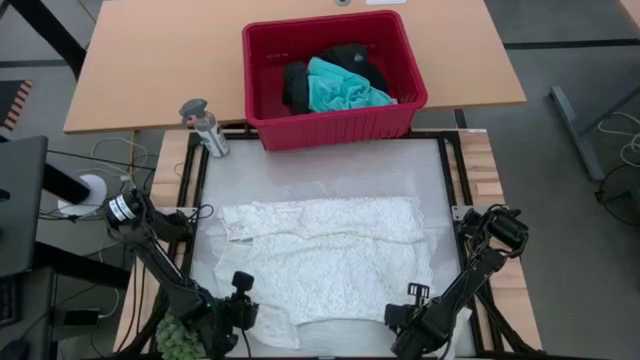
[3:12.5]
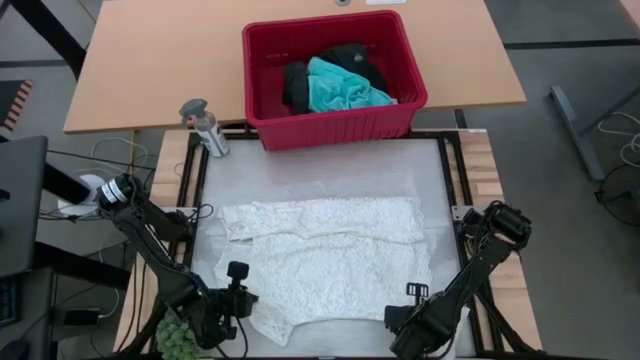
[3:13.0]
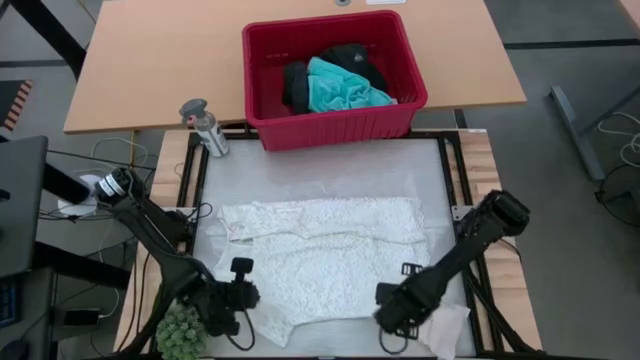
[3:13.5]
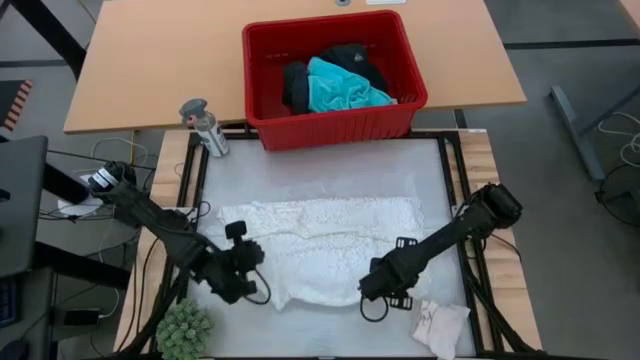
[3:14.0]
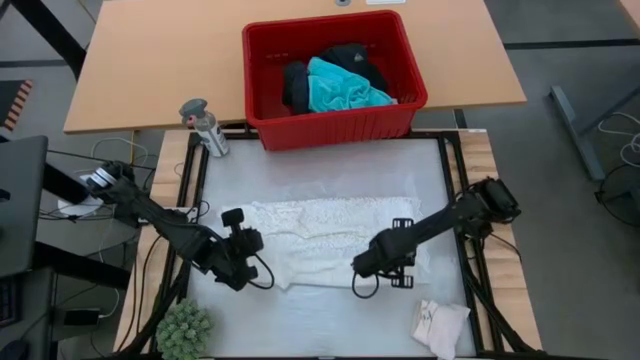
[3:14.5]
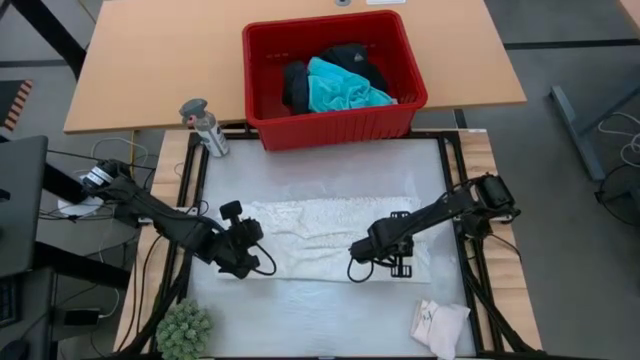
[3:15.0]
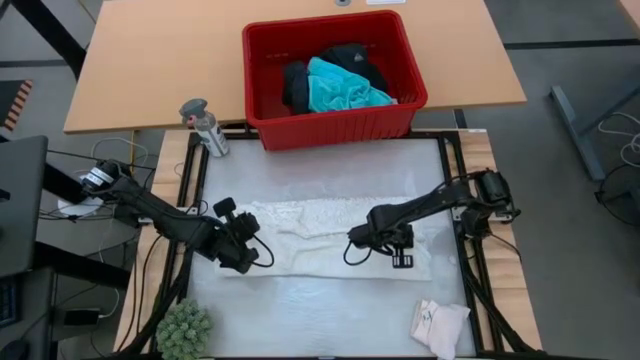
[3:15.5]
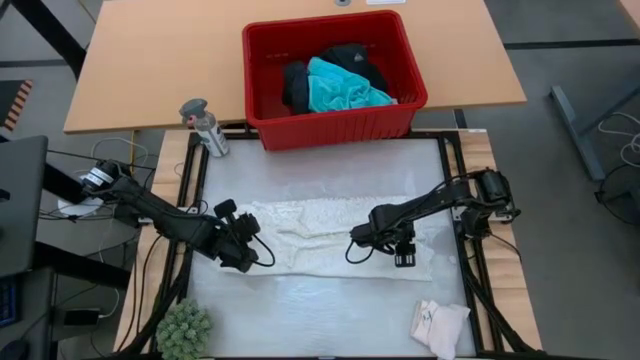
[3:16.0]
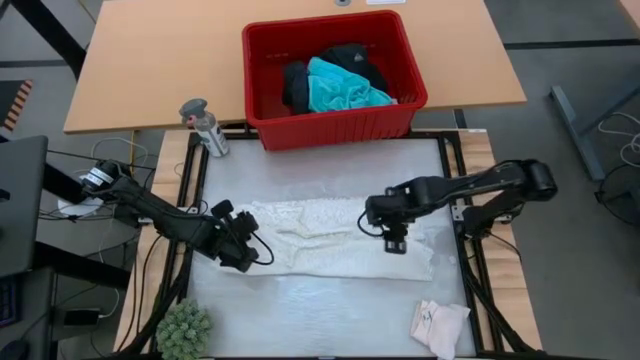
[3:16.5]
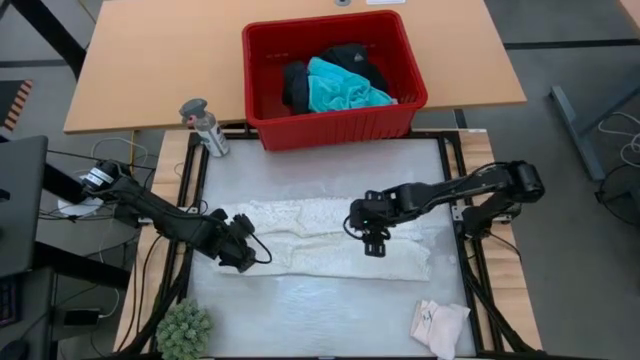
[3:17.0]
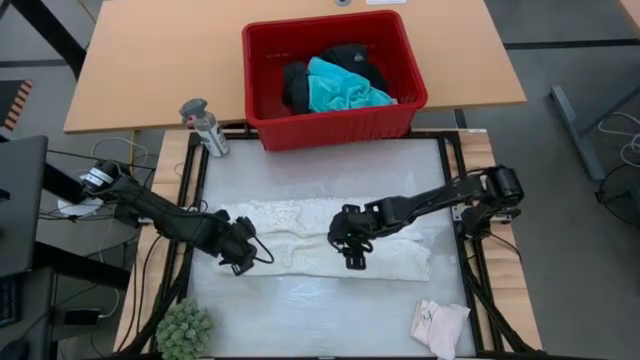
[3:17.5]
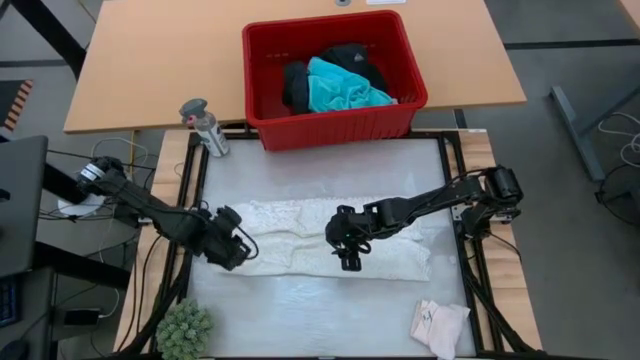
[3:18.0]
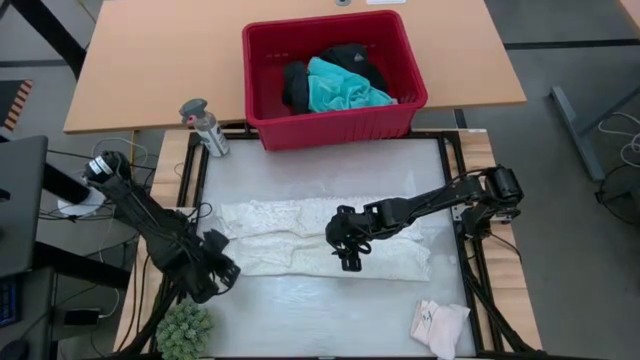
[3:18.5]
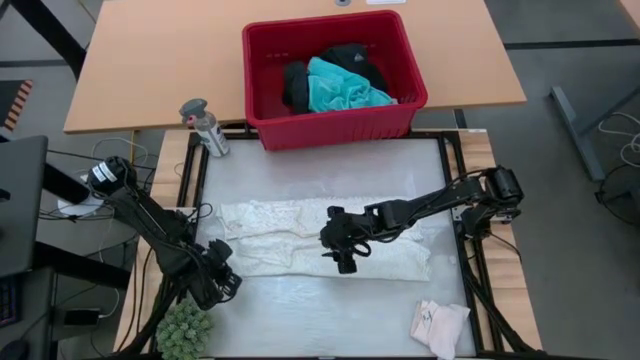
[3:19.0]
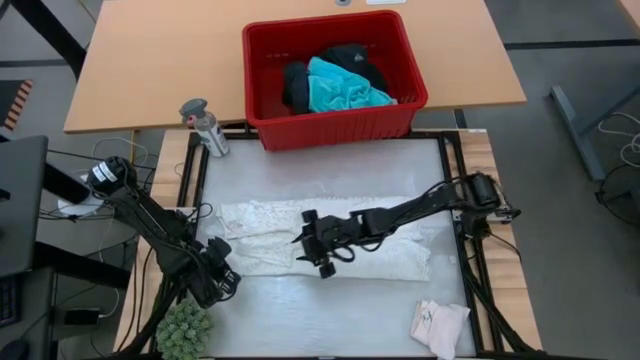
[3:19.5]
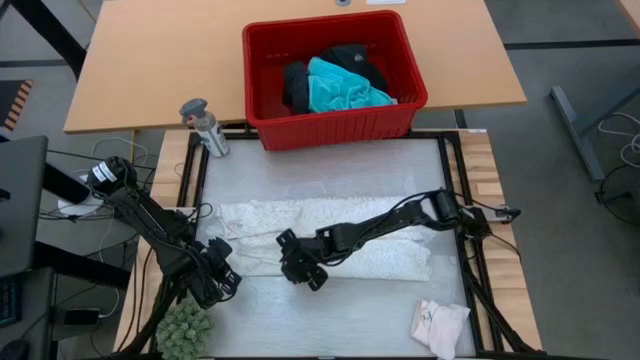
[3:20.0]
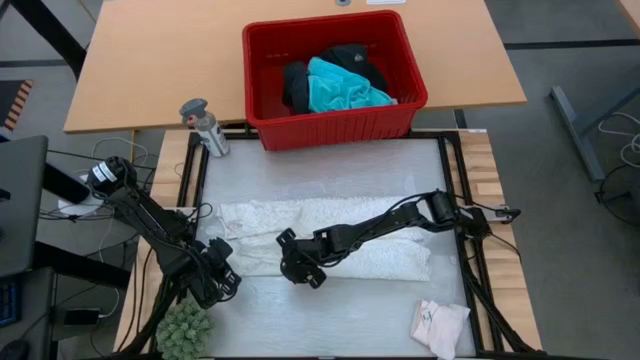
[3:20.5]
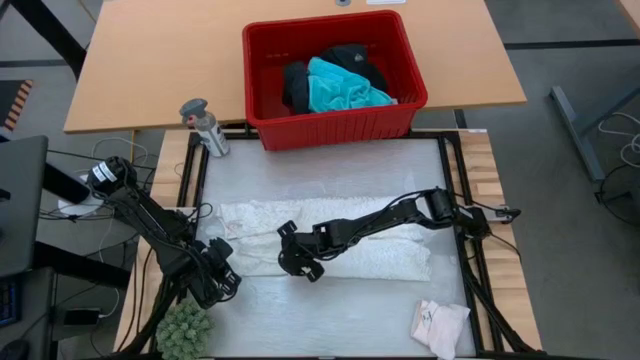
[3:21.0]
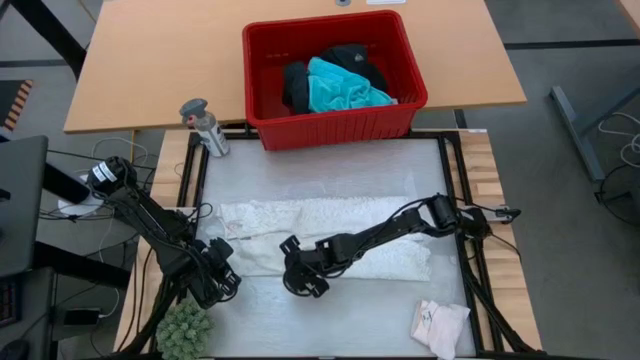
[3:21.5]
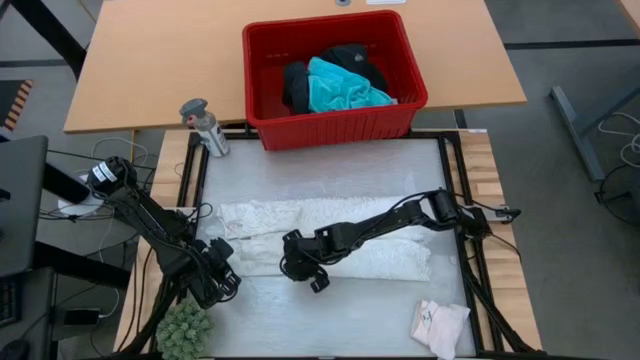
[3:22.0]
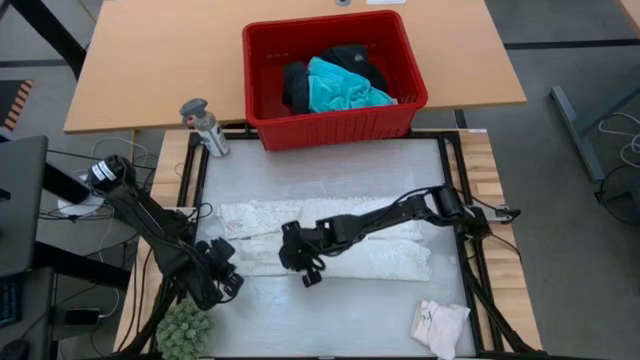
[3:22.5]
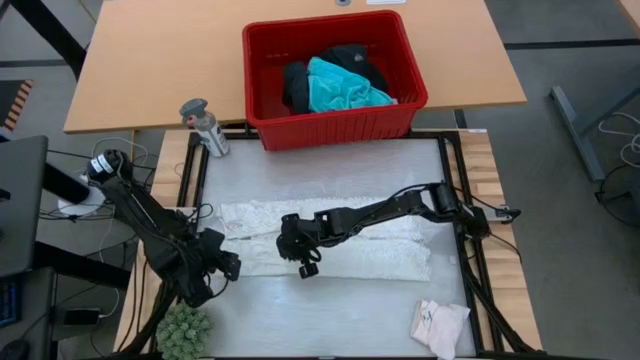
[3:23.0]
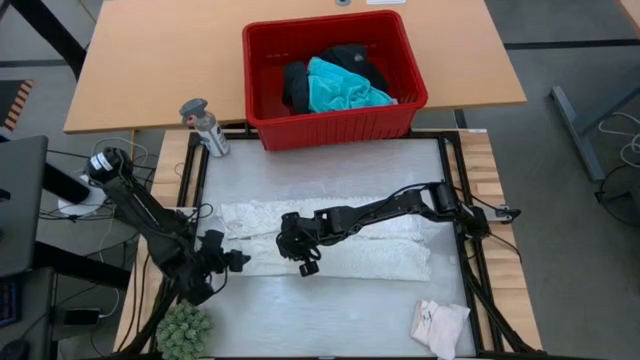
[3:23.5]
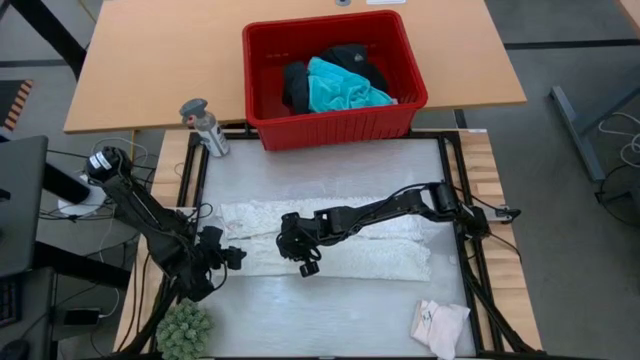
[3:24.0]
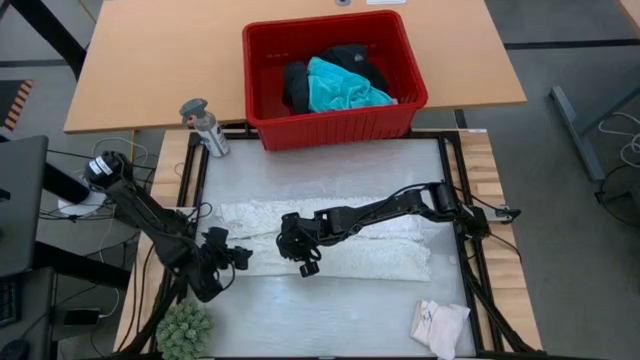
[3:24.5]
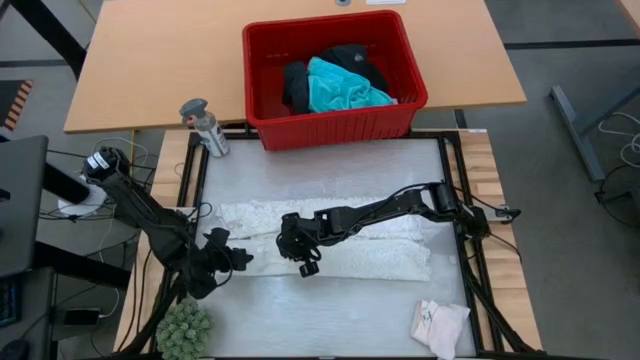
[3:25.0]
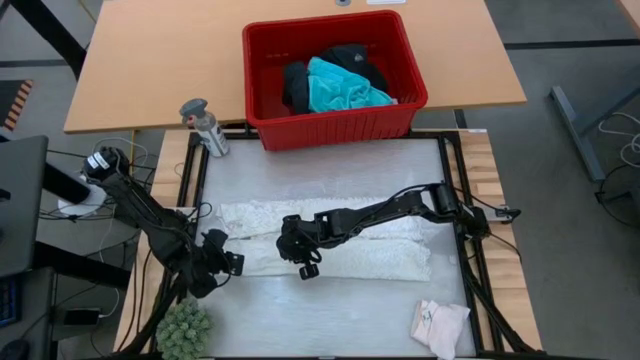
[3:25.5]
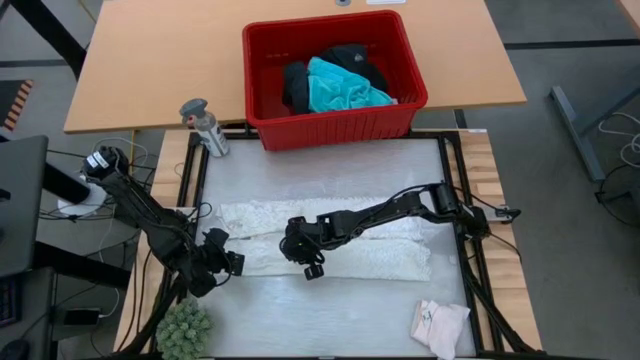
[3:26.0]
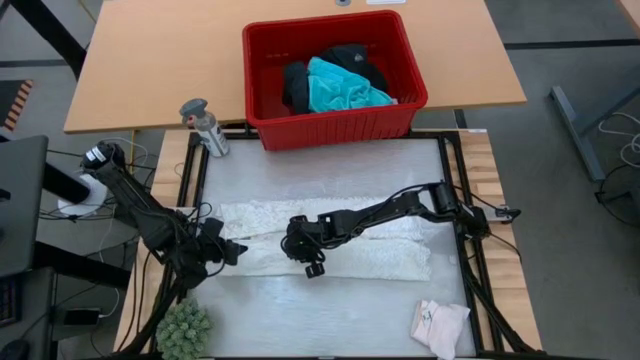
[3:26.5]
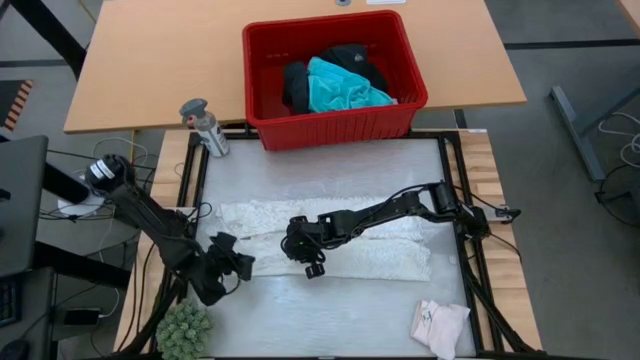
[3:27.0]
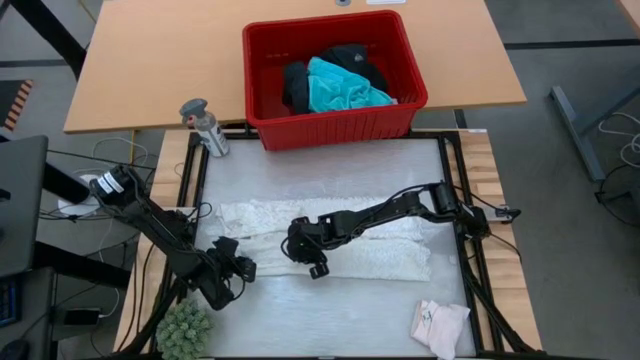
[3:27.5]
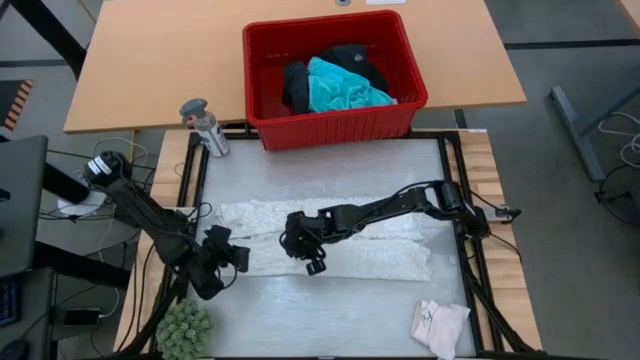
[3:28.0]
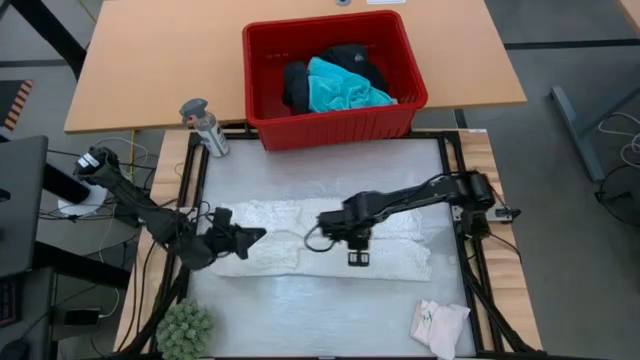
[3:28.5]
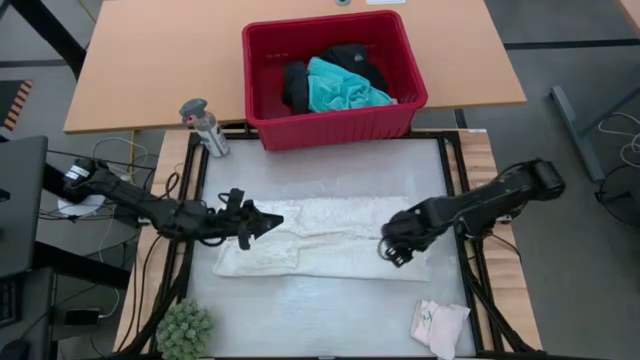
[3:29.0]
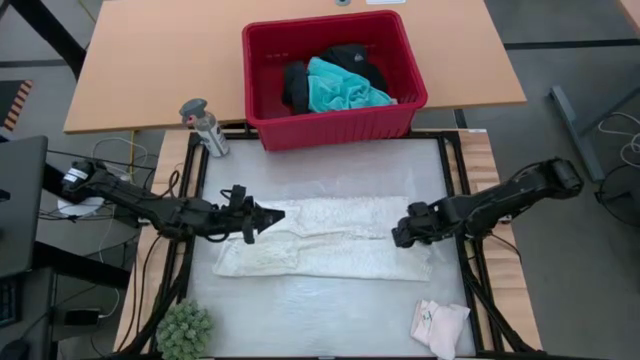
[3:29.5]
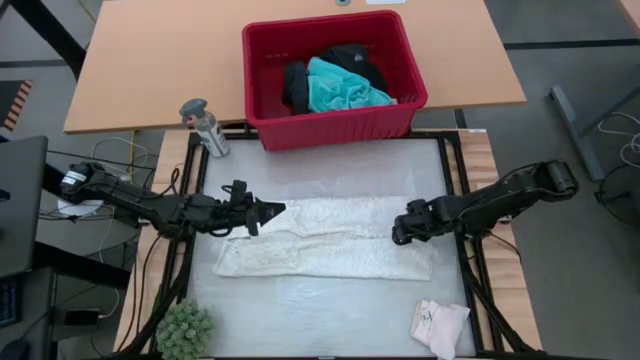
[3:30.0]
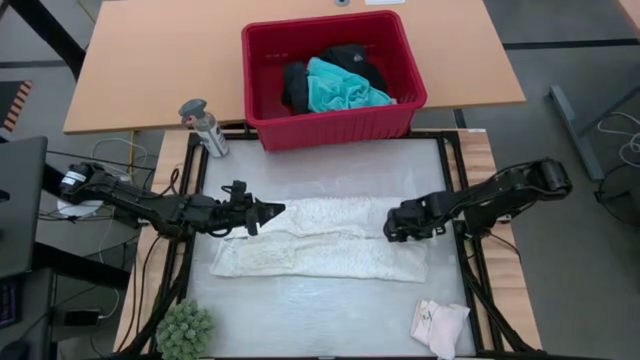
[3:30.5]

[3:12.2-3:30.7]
Task: Fold Laundry from Bin
Fold the white blouse
